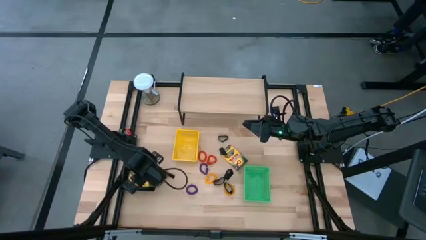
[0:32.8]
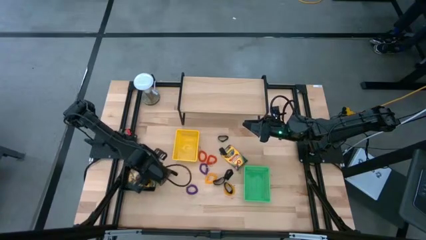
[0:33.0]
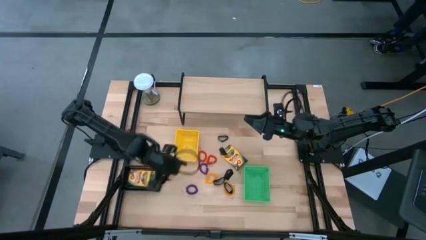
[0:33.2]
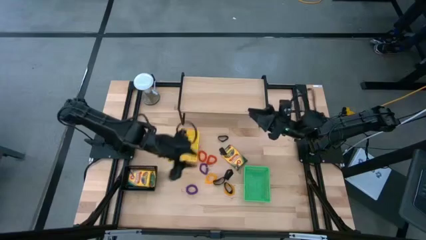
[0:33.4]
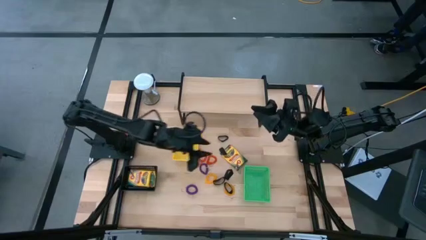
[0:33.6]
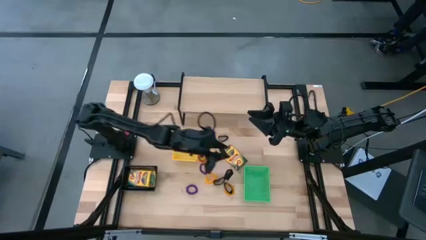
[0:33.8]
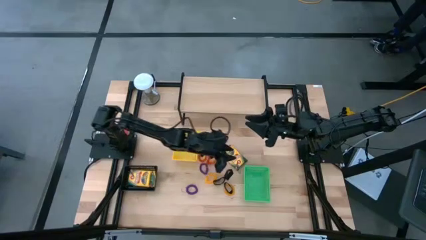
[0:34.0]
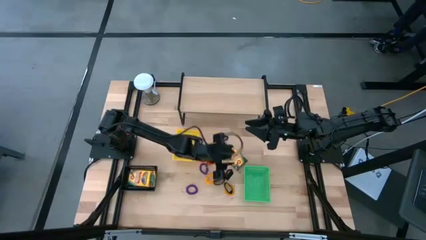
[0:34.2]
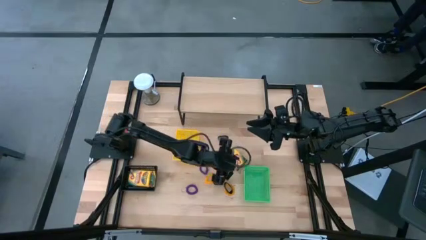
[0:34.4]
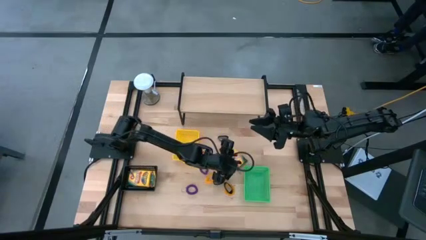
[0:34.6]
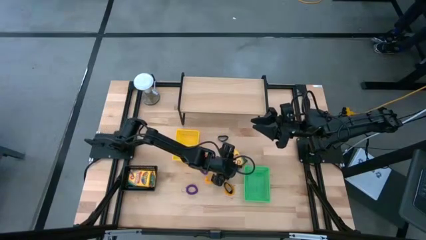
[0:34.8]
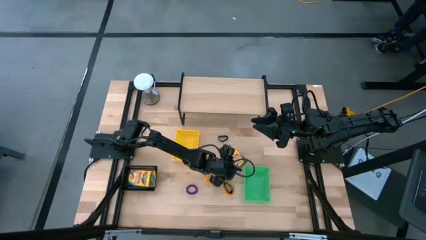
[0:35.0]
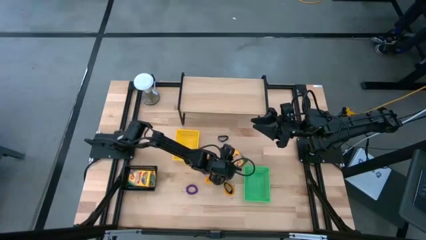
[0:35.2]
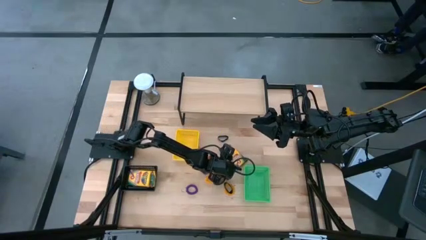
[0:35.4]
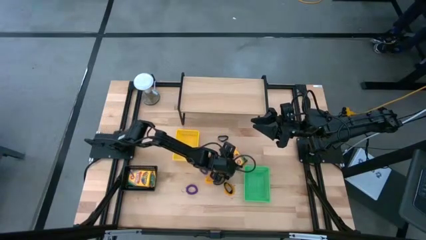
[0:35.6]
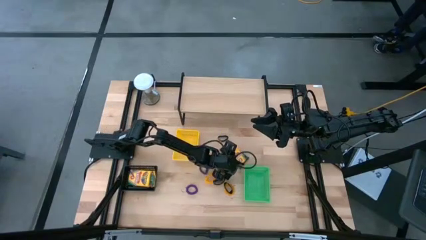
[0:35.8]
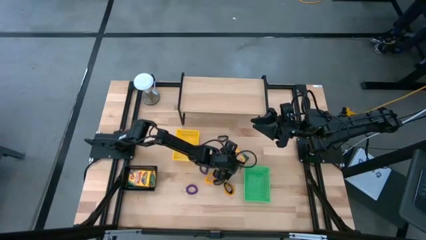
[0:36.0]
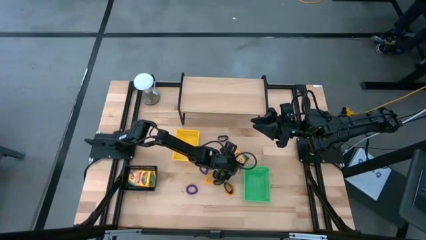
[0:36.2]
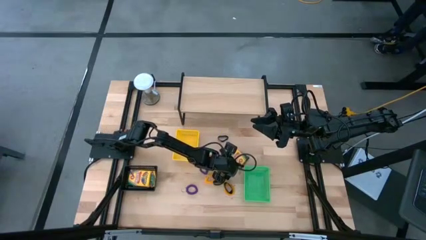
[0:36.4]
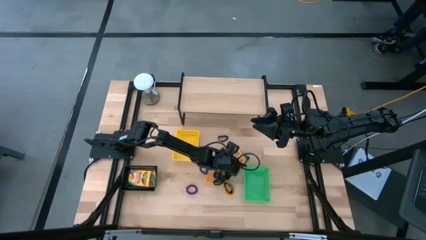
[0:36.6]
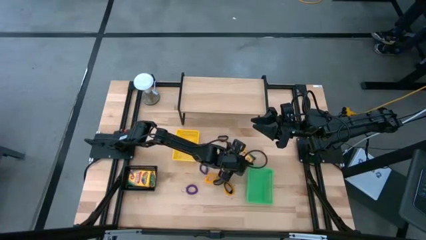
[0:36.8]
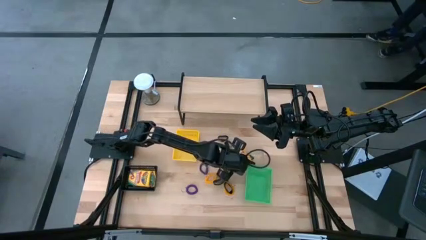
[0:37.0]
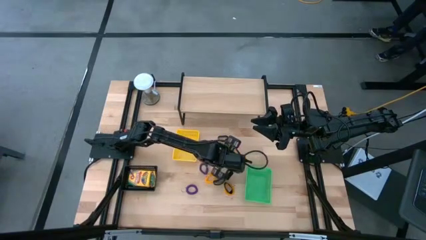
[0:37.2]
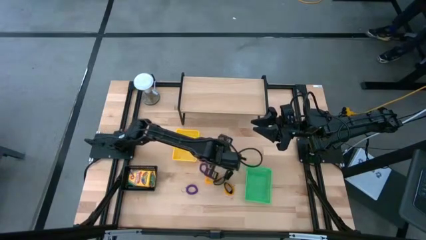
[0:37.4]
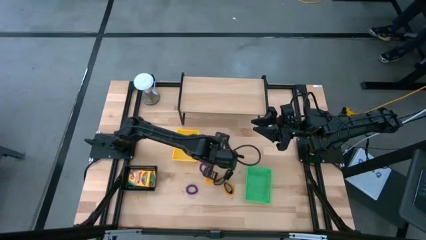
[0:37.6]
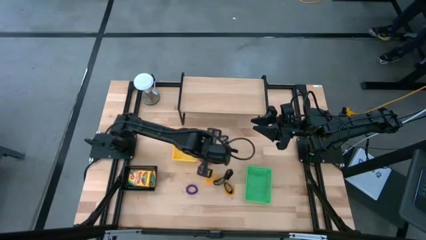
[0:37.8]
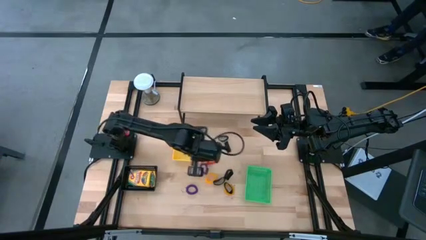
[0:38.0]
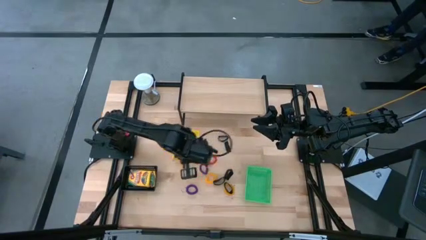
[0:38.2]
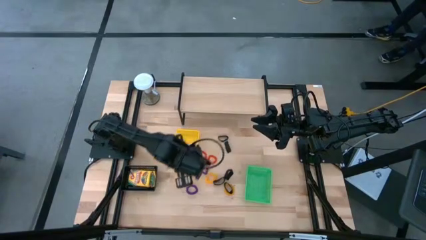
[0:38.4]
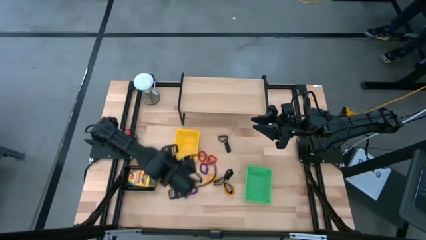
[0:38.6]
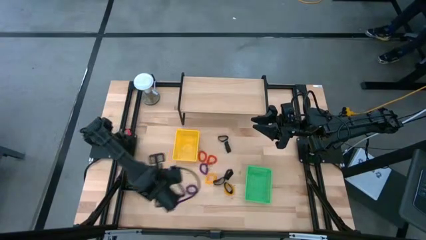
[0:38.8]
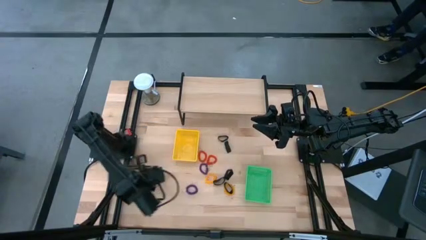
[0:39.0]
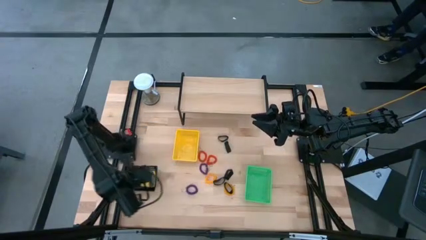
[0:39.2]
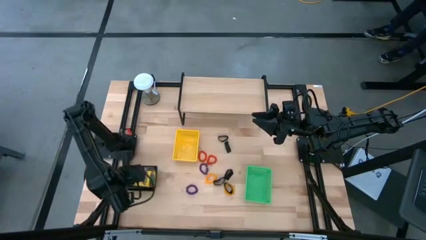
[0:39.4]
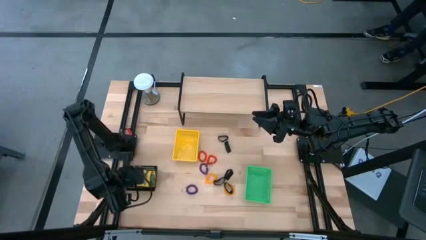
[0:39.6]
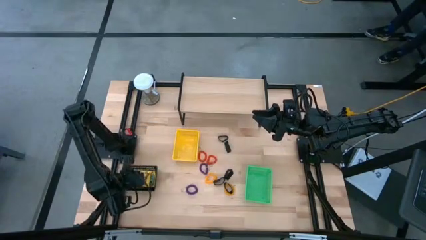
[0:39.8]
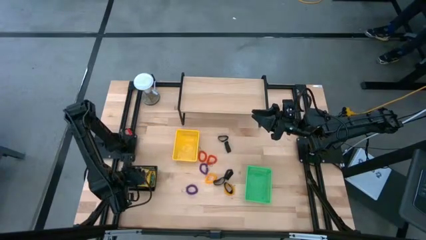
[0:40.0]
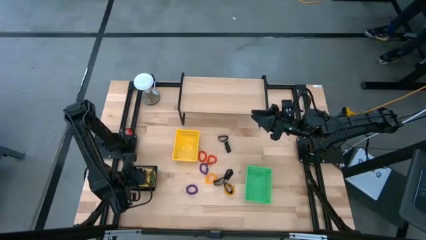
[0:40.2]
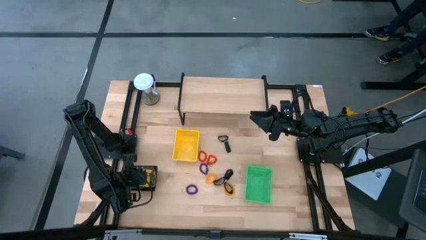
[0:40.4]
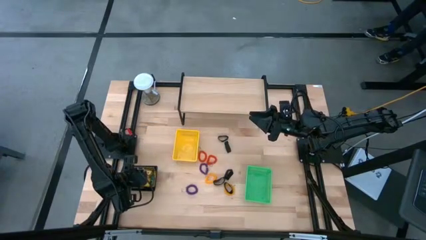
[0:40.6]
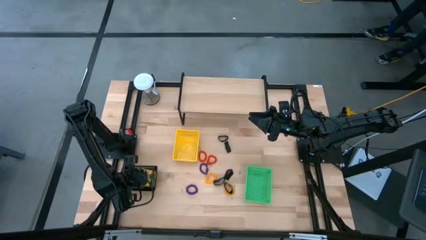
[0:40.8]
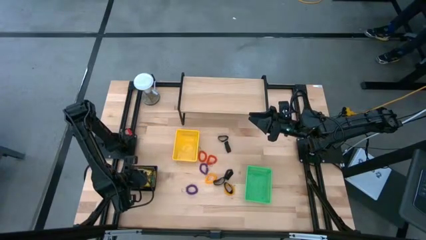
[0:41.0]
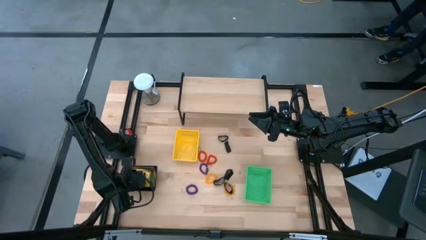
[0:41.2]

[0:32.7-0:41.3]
Task: Pick & Place Office Desk Supplies
Put the yellow crayon box into the black bin

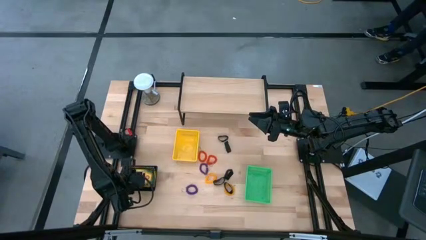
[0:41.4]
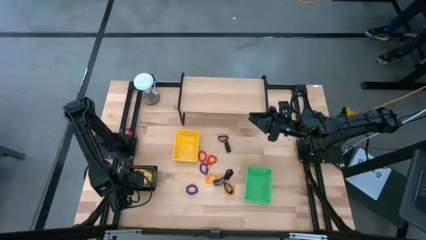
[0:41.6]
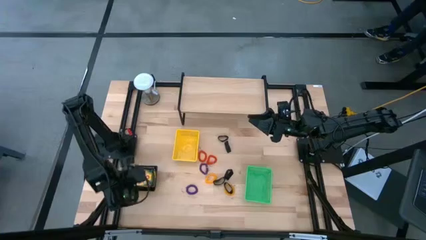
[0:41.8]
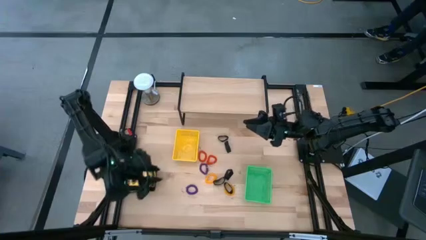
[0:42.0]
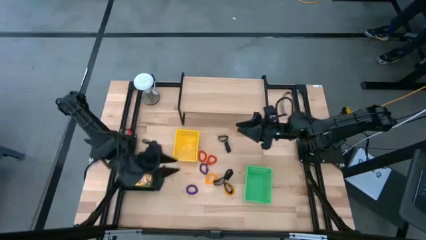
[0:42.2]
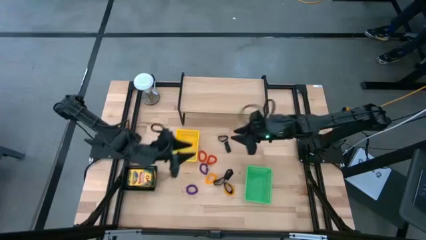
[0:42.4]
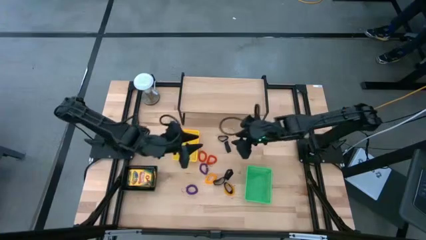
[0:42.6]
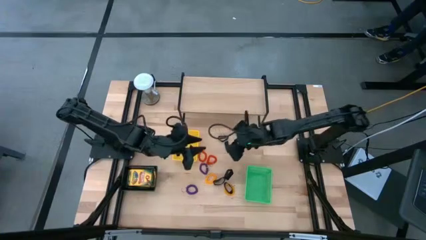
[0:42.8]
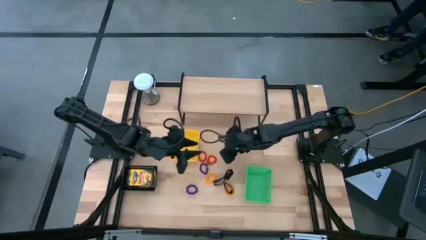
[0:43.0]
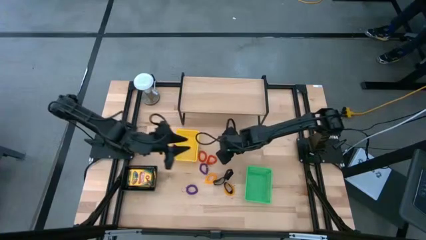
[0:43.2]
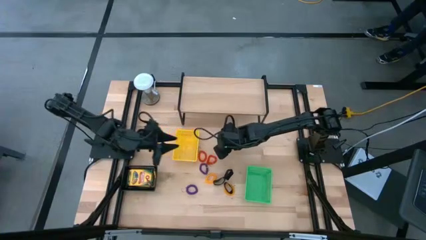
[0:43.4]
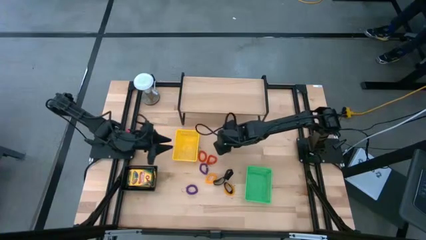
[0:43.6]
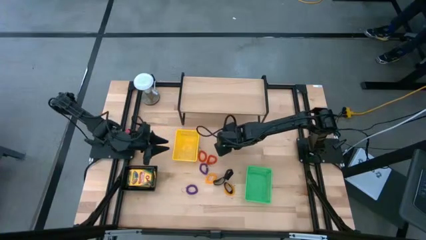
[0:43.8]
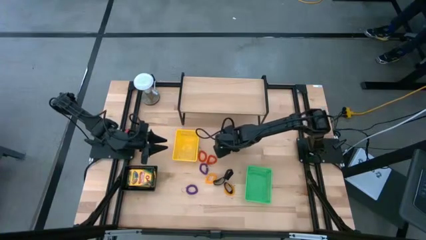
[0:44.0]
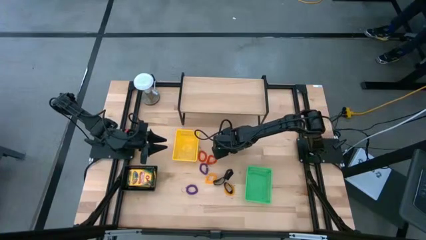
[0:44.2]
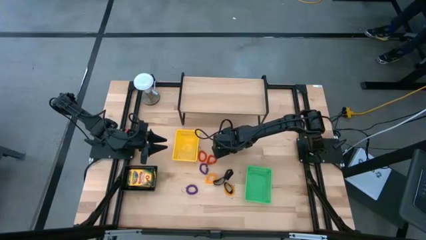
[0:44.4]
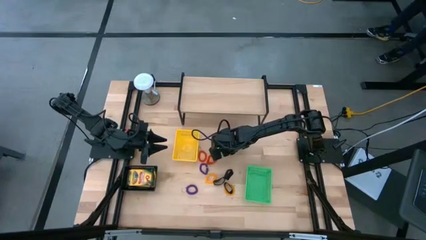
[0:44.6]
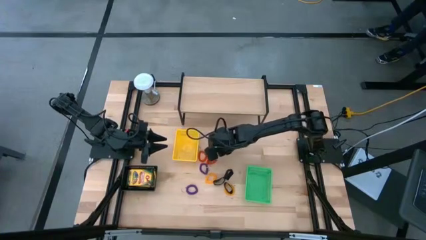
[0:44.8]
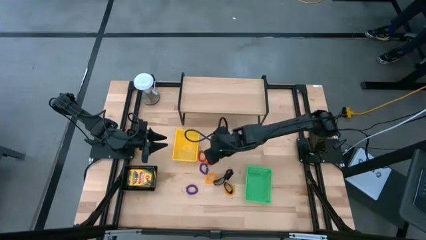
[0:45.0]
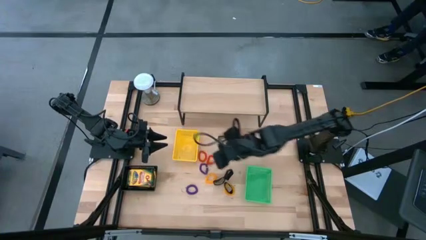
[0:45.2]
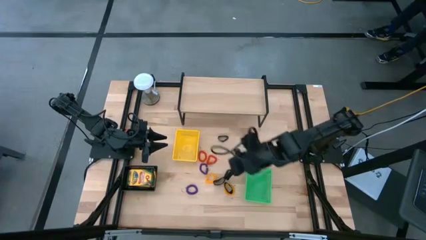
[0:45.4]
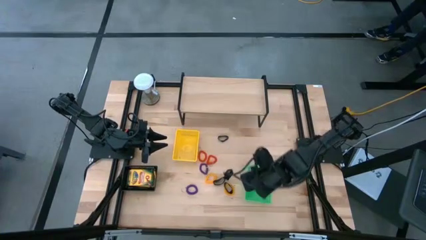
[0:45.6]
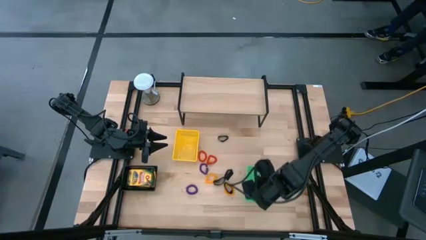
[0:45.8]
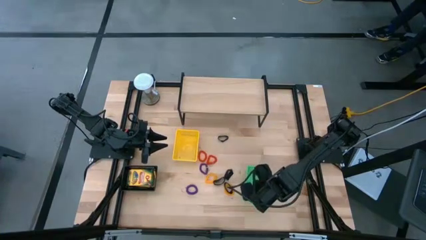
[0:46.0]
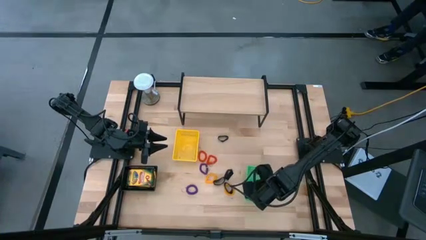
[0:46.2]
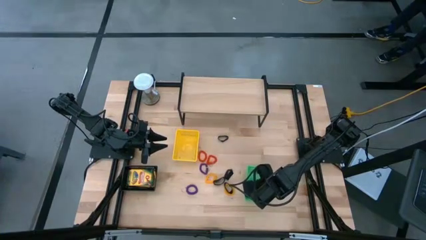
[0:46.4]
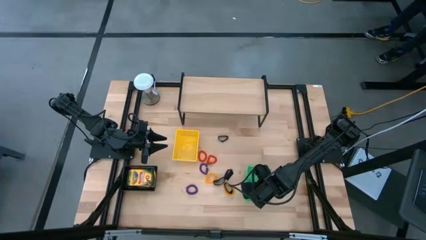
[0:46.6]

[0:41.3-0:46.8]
Put the black rubber band into the green bin

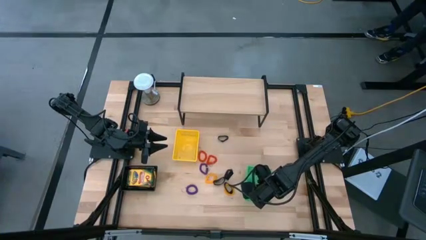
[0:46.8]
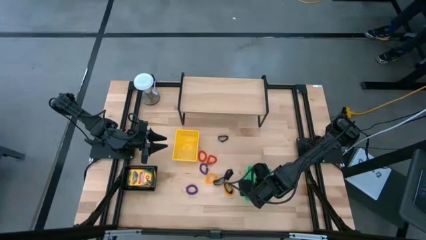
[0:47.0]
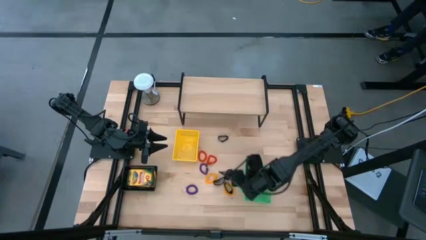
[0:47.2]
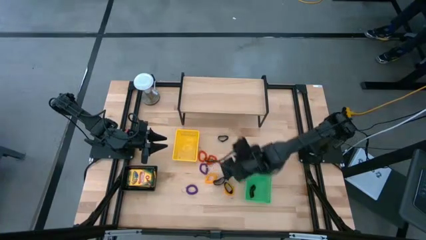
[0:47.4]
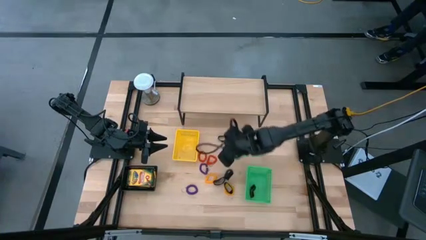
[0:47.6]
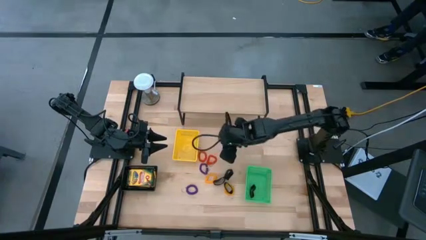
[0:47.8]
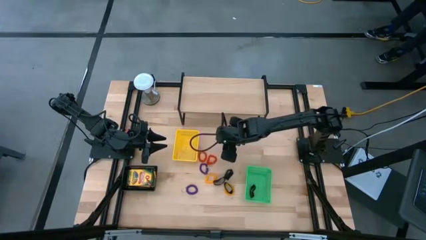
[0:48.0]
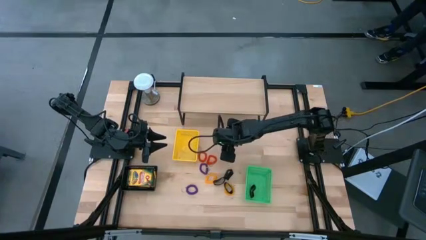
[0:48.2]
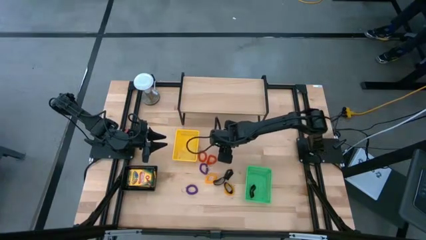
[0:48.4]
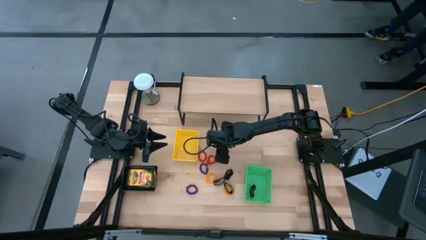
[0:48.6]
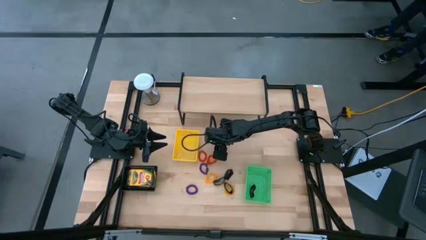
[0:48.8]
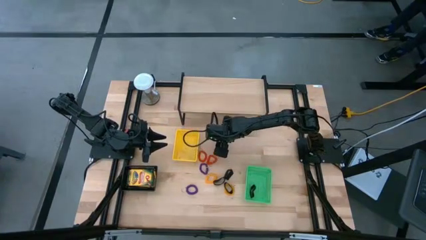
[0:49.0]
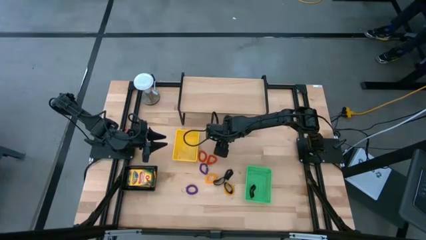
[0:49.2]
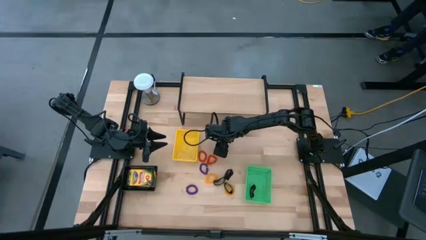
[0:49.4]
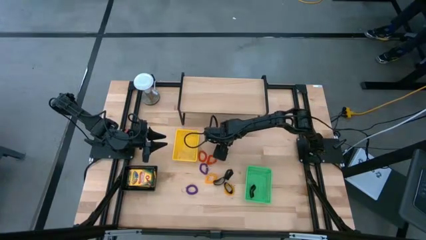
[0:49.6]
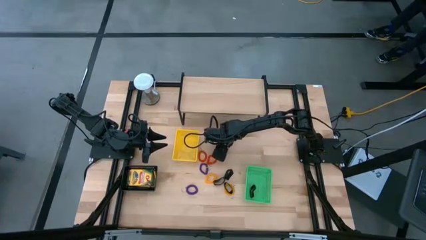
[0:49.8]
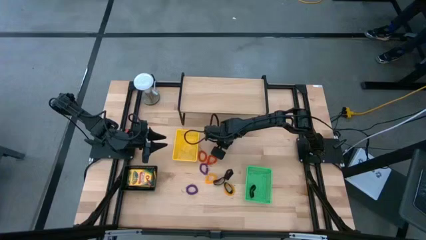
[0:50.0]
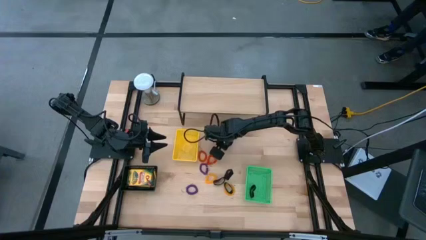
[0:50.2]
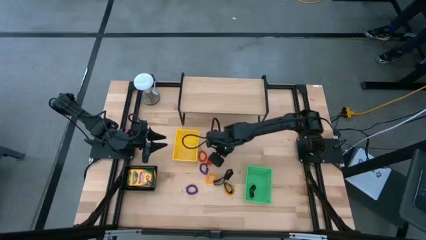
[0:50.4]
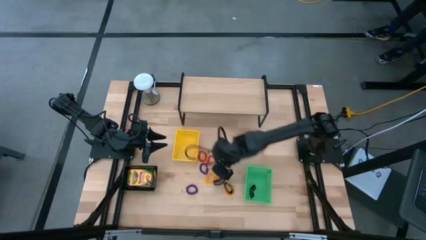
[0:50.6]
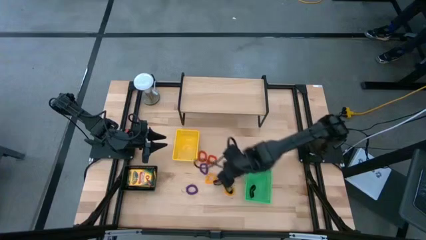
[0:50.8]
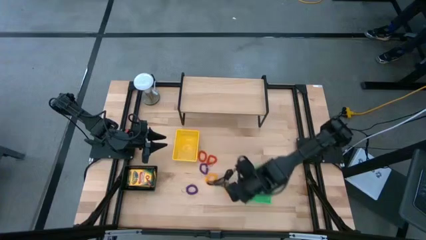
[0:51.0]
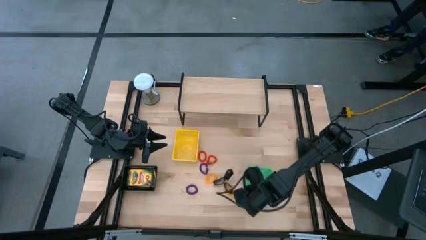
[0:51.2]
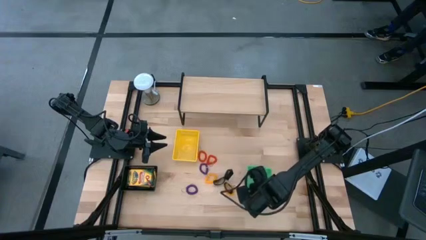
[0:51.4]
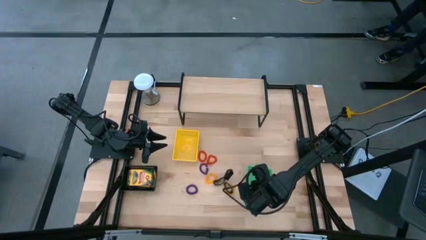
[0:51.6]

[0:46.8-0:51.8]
Put the black rubber band into the green bin
